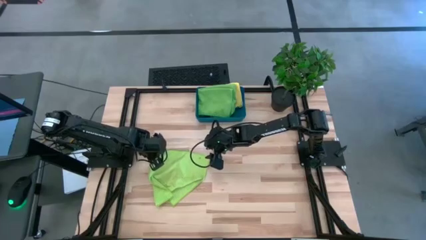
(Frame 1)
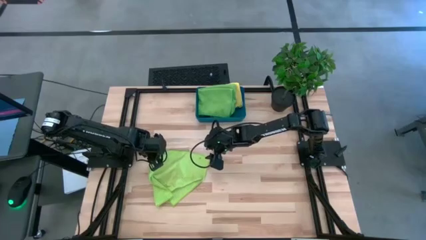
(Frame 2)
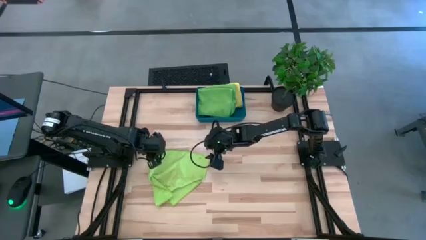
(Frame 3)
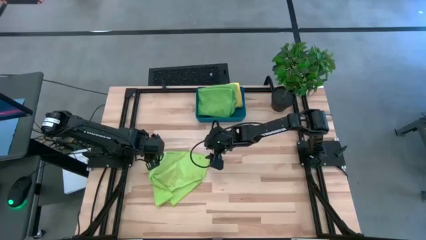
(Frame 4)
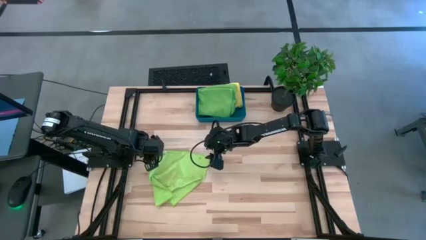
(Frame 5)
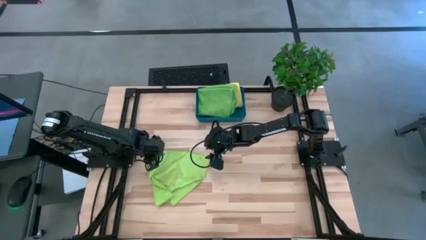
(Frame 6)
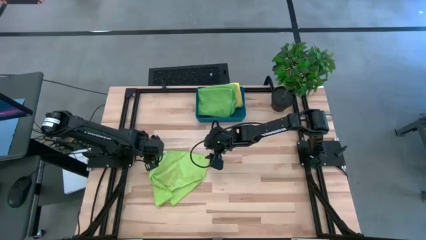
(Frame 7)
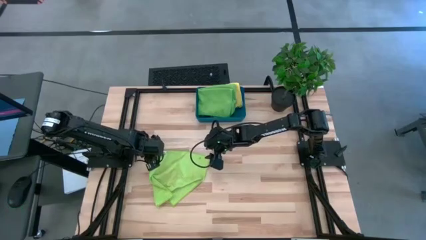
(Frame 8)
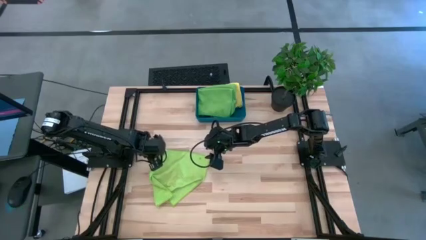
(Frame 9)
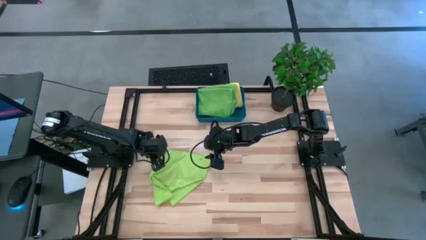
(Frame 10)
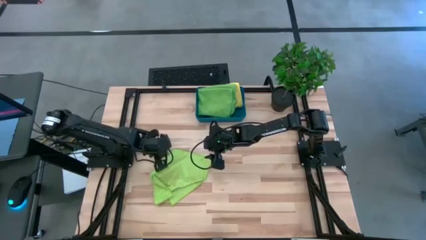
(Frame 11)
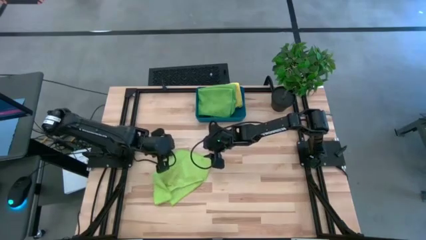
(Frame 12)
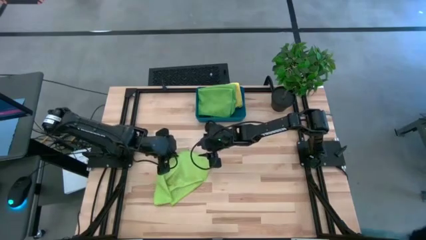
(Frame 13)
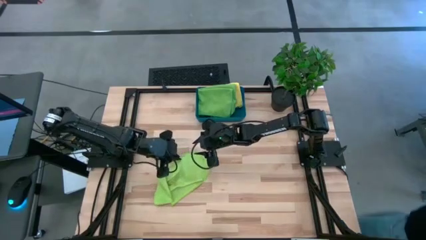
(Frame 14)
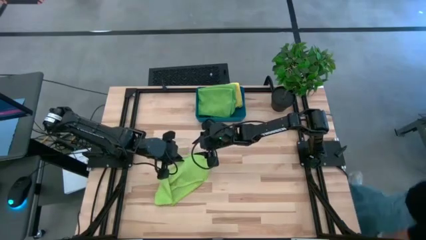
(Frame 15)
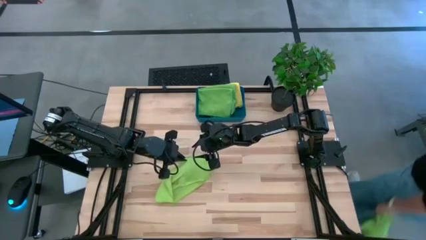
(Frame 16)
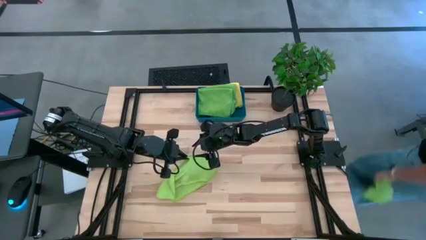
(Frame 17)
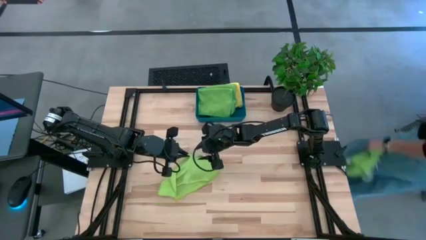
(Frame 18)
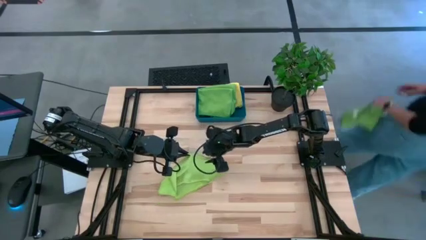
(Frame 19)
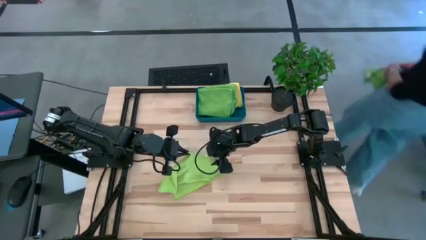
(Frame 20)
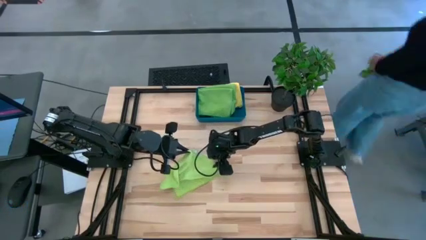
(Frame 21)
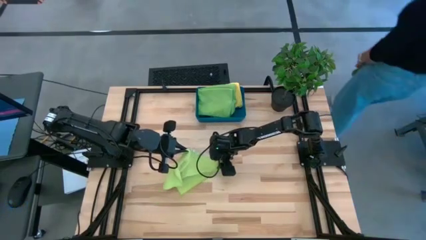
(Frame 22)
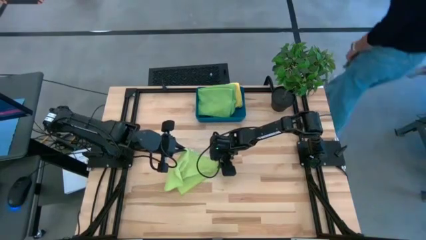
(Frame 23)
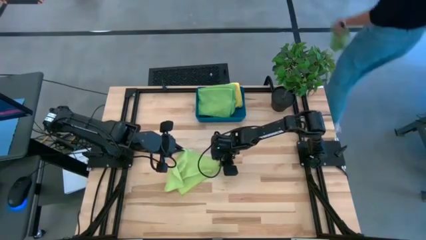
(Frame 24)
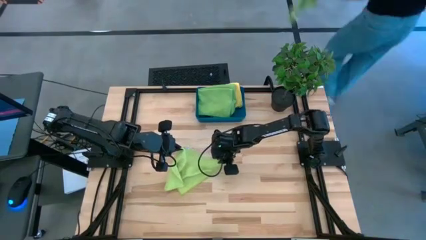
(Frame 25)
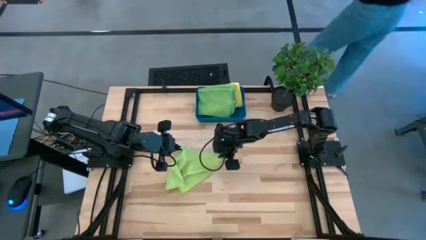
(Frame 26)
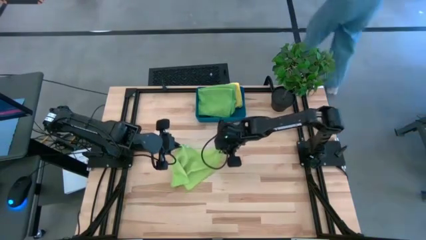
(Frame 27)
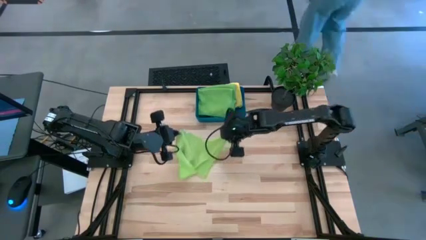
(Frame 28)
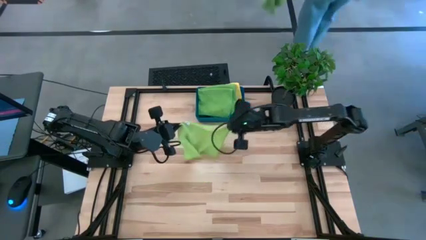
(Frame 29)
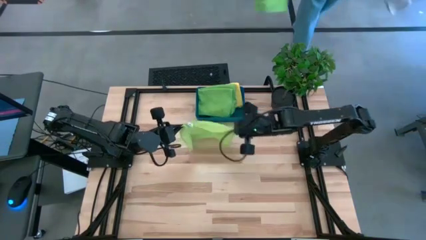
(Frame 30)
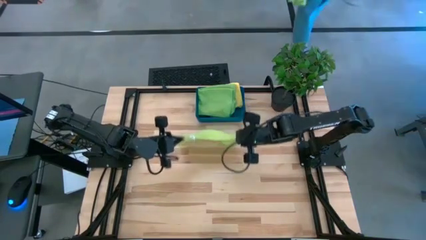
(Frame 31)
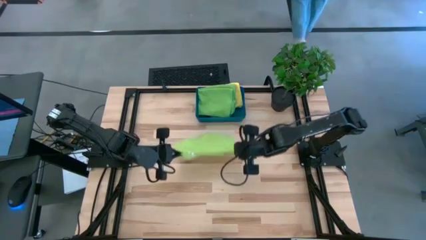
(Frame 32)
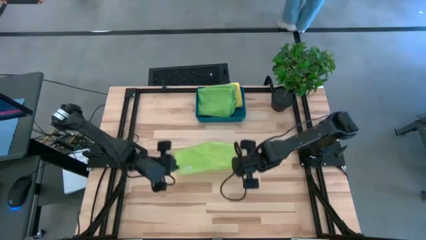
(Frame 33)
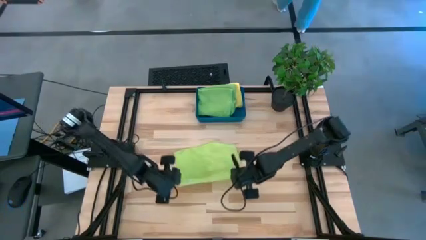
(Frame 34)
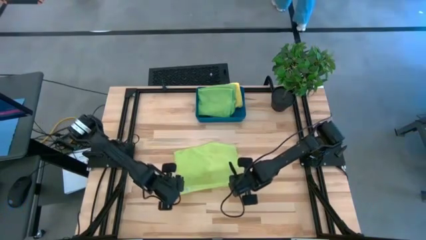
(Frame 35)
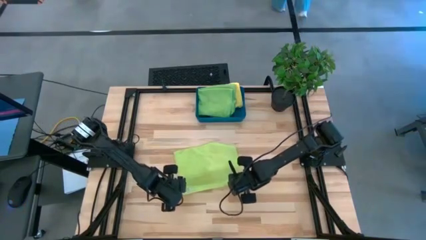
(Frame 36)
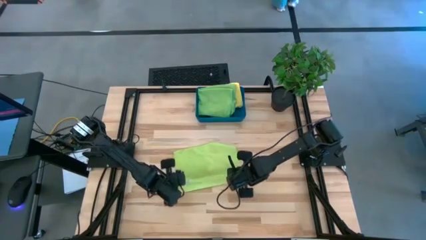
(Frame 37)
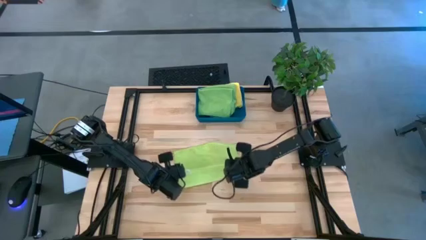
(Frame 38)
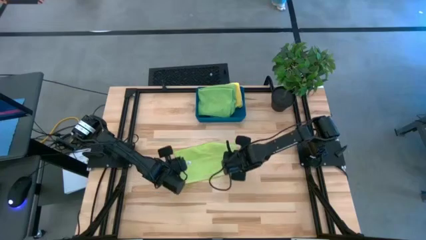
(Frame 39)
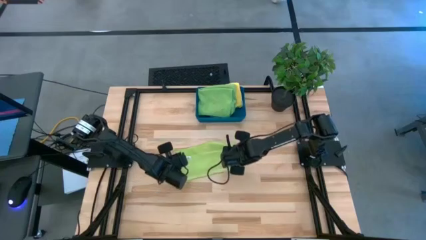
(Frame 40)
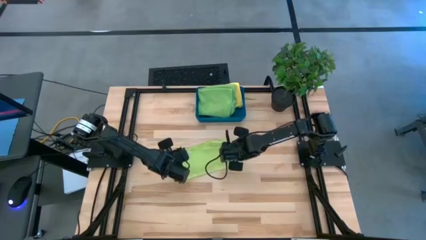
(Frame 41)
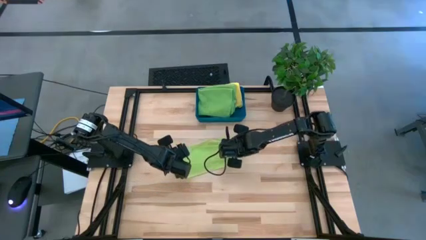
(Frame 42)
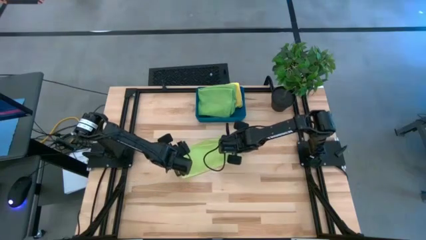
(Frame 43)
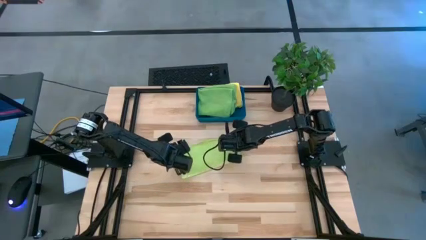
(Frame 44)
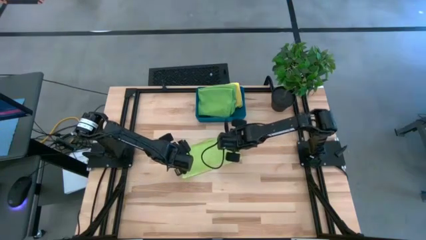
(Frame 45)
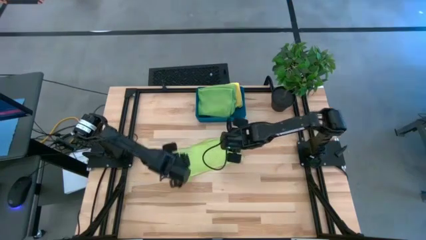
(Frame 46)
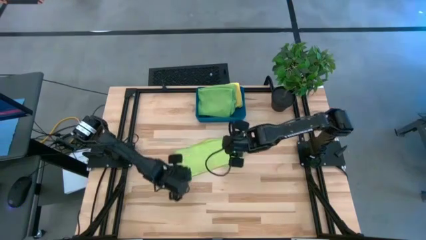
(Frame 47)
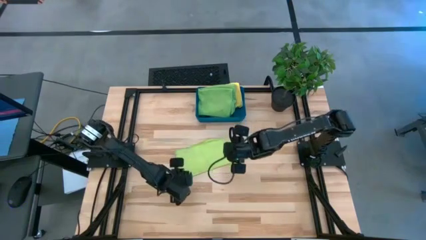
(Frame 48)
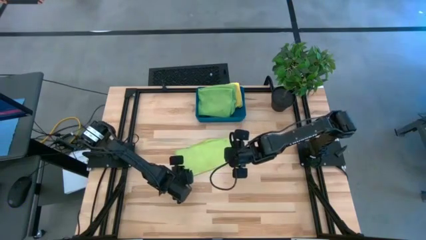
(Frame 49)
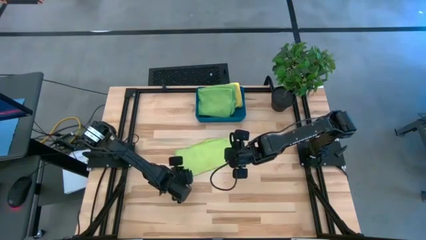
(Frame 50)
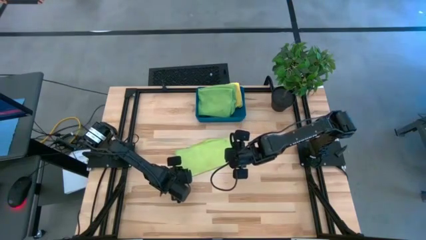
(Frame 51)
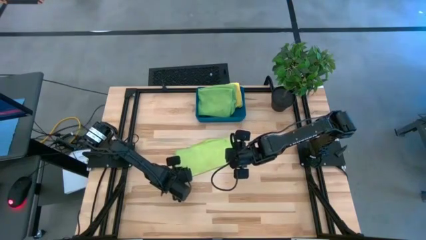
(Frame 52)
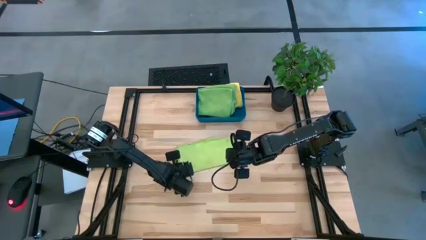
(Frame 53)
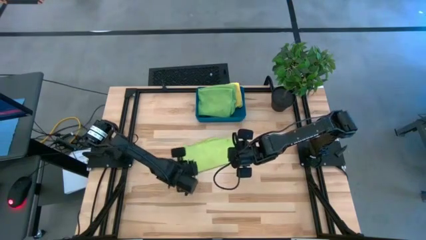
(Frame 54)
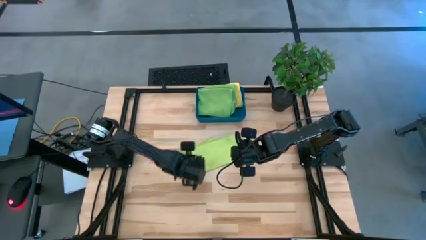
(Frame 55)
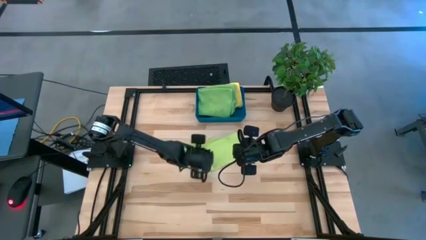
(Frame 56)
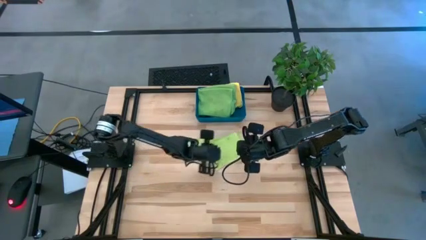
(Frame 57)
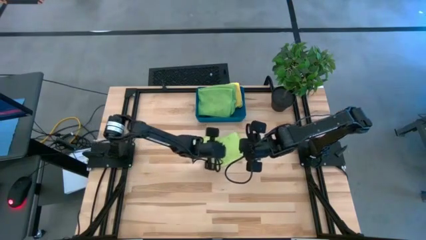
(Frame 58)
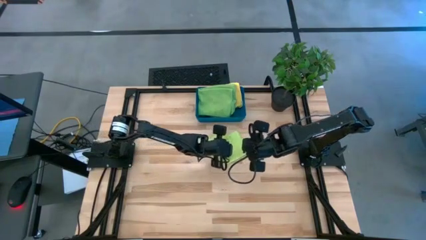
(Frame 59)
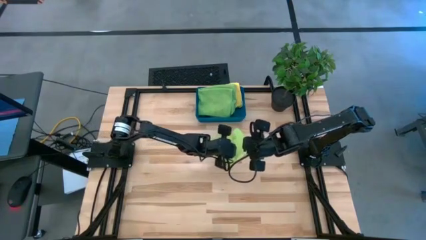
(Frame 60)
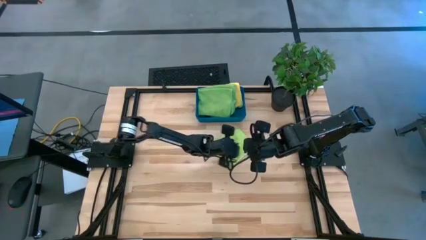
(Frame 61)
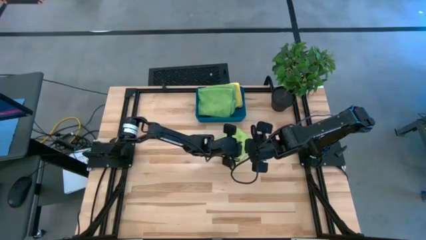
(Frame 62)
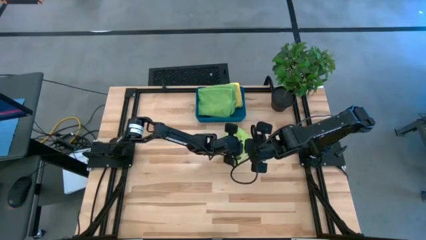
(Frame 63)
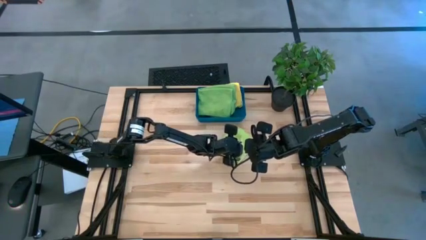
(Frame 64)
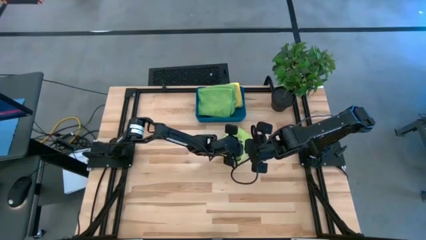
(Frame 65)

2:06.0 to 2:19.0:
Task: Fold microfiber towels
Fold the light green microfiber cloth

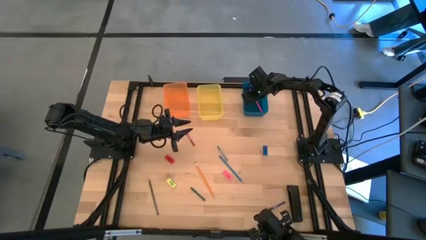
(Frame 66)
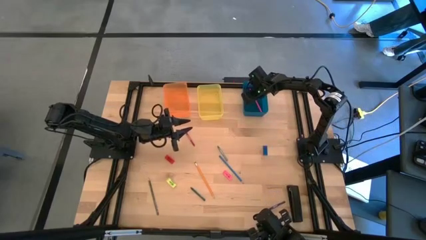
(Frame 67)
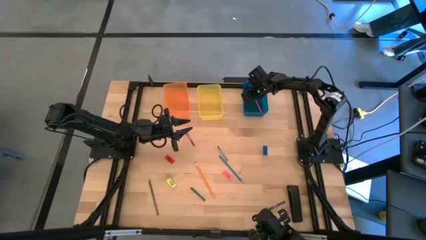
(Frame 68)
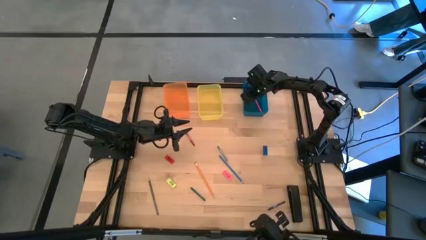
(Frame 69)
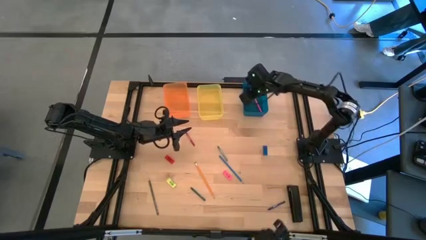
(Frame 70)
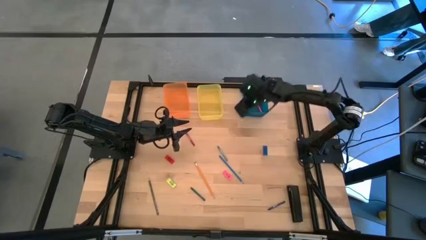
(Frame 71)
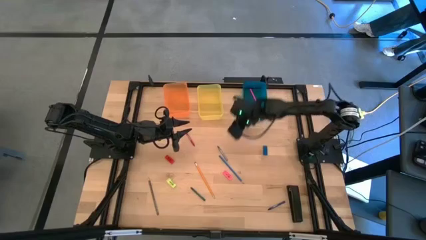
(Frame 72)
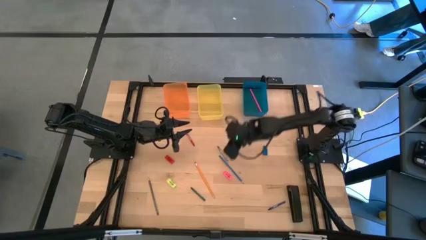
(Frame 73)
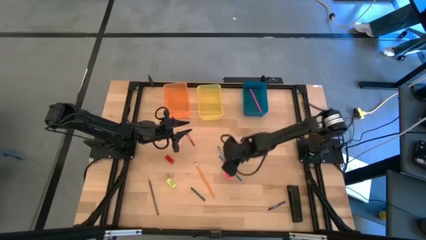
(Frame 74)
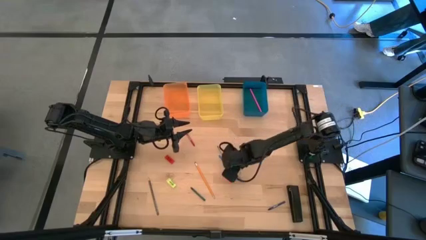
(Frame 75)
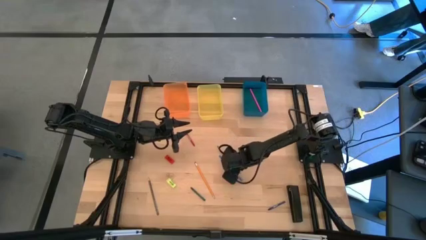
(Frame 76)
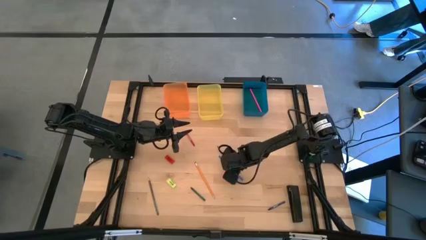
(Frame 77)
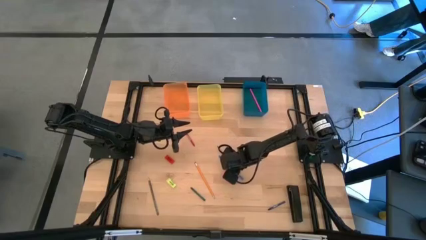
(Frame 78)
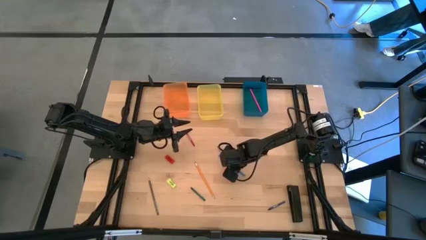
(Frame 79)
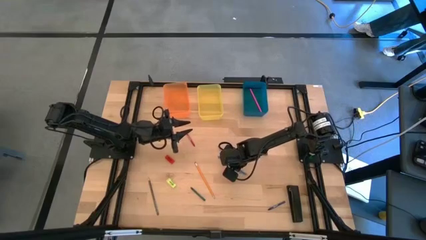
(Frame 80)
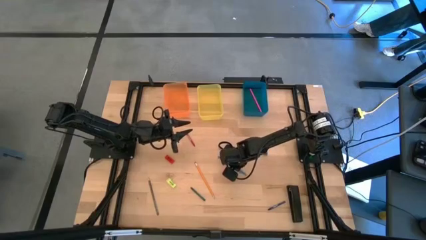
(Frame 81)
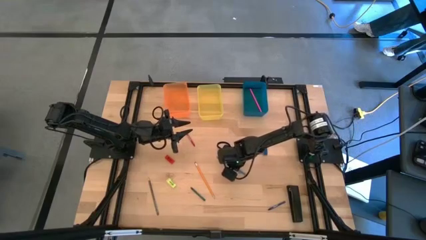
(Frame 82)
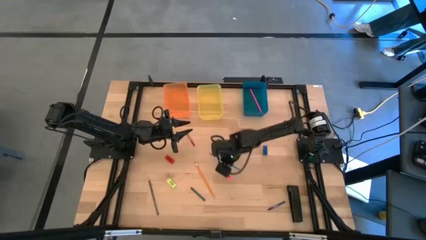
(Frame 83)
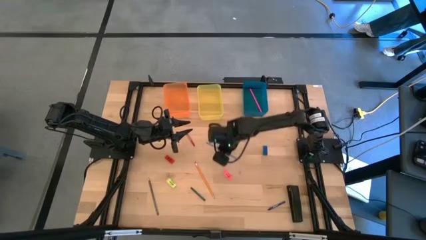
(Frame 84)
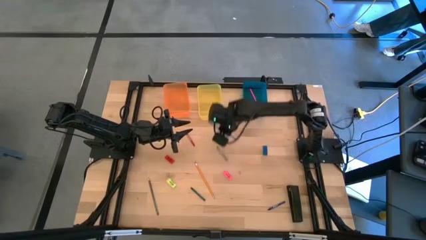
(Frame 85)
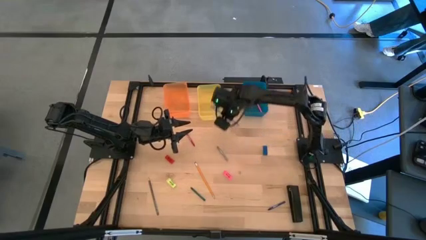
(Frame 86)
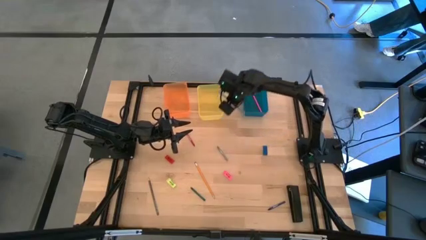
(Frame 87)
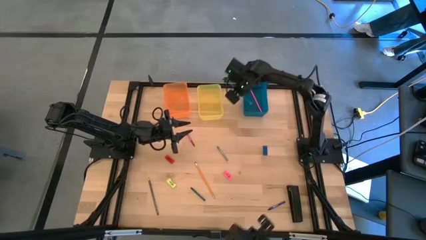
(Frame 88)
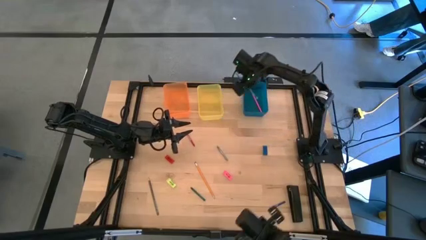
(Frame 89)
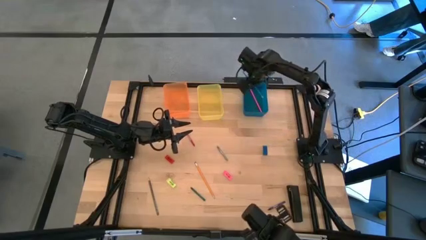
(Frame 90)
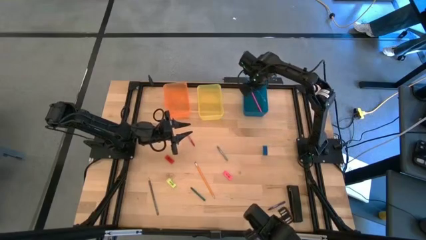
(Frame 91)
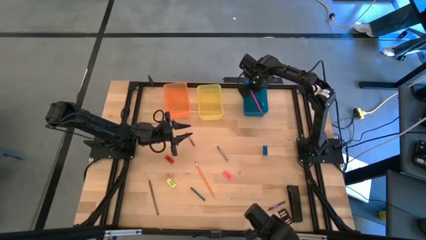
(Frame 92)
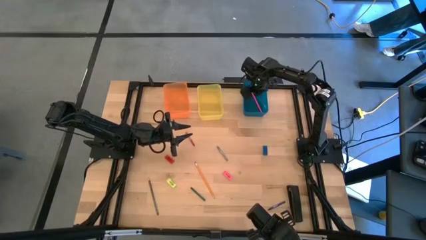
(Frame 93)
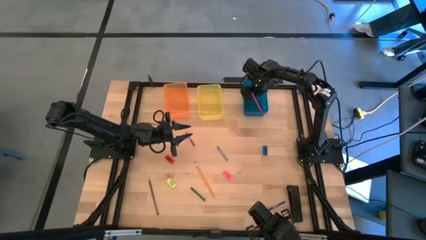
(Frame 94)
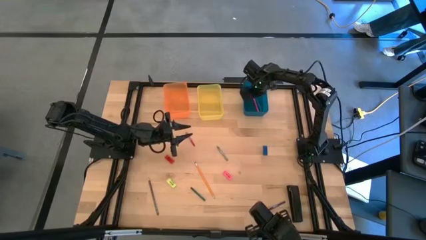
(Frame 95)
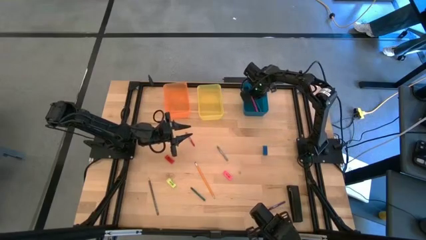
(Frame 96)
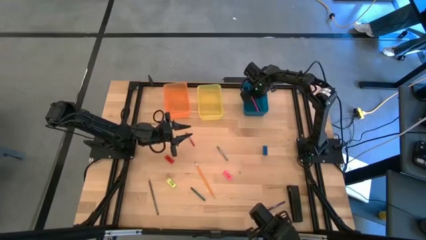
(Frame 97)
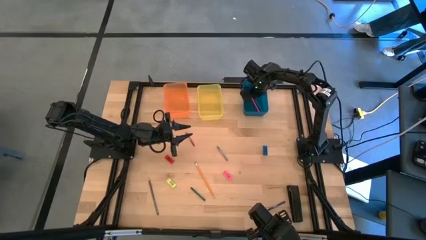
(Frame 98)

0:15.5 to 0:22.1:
Task: Sort crayons/erasers/pens/pencils in bins
Put the blue pencil into the blue bin
